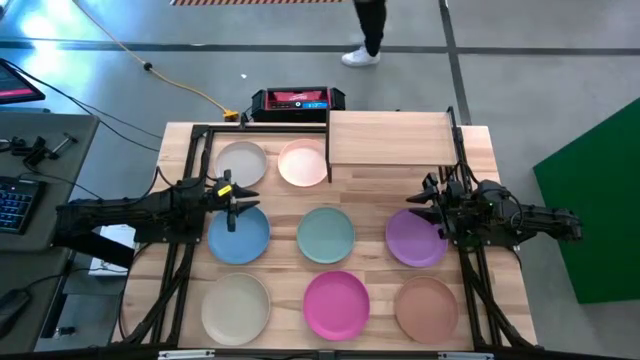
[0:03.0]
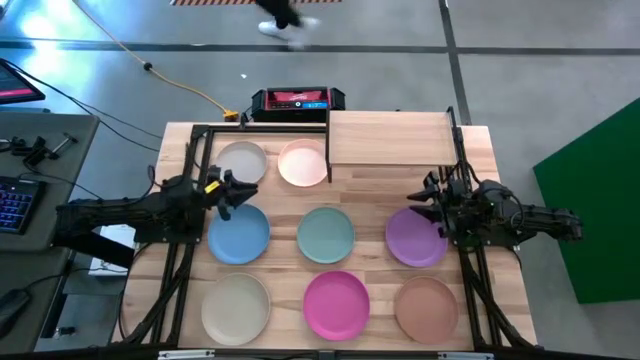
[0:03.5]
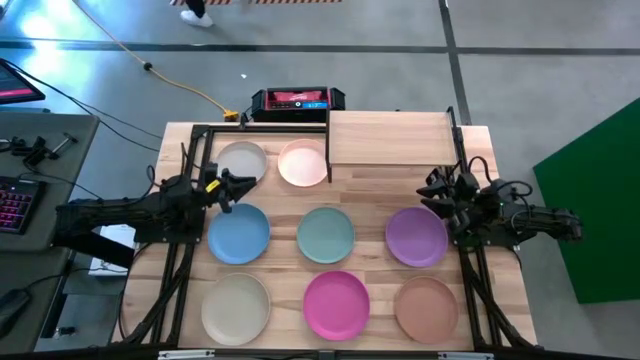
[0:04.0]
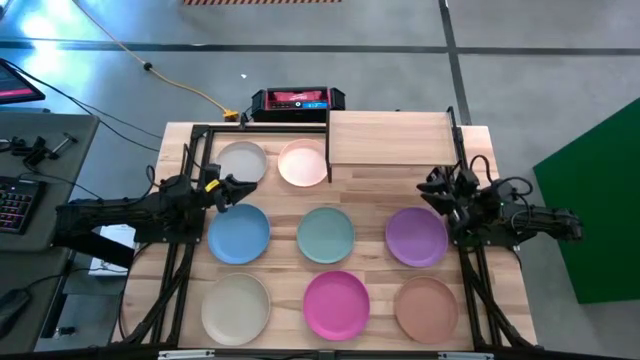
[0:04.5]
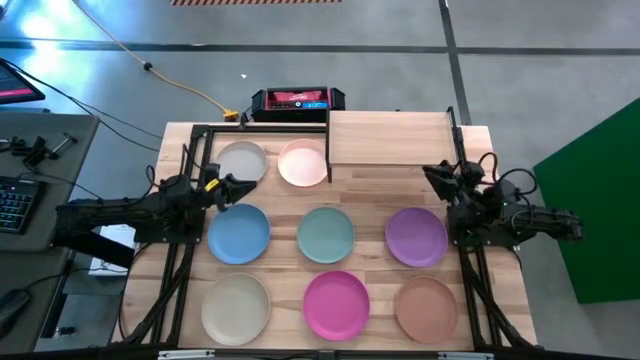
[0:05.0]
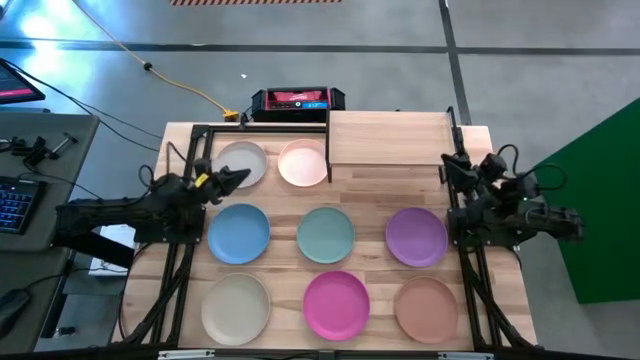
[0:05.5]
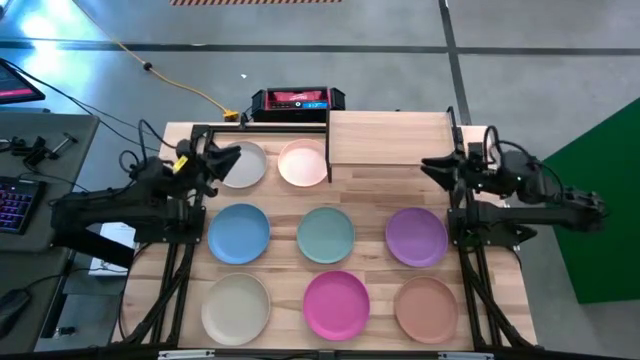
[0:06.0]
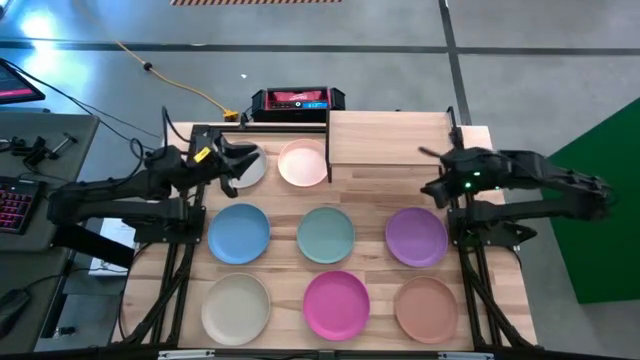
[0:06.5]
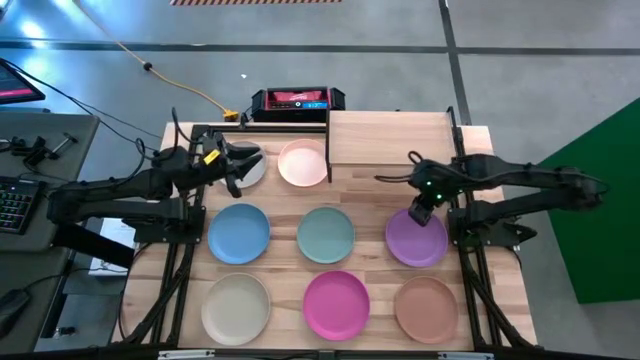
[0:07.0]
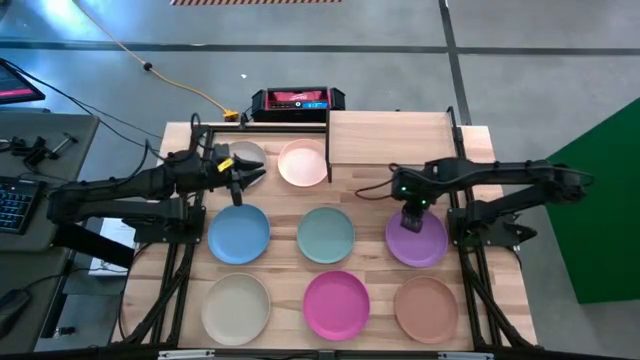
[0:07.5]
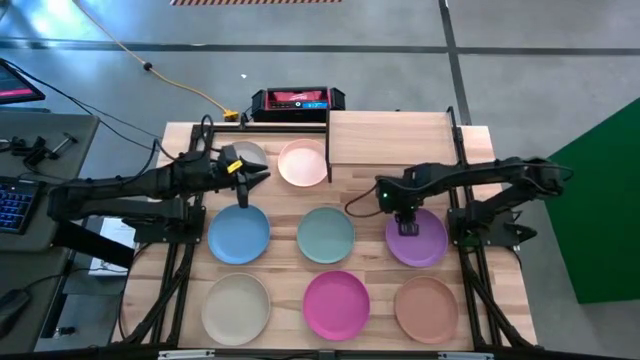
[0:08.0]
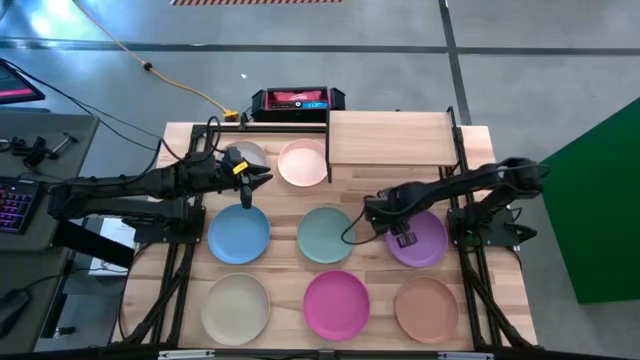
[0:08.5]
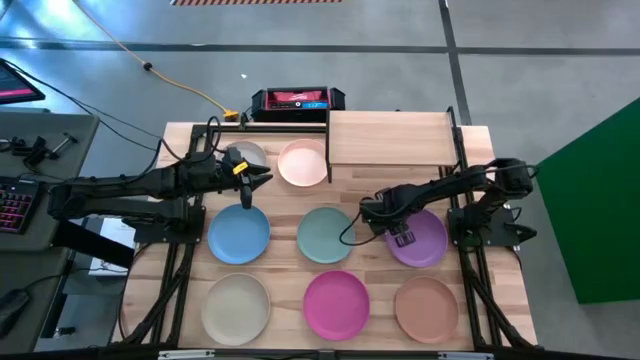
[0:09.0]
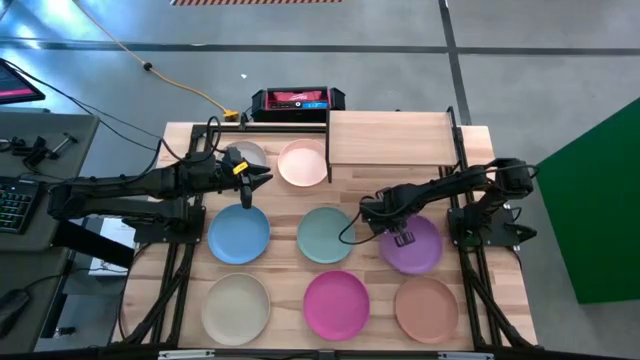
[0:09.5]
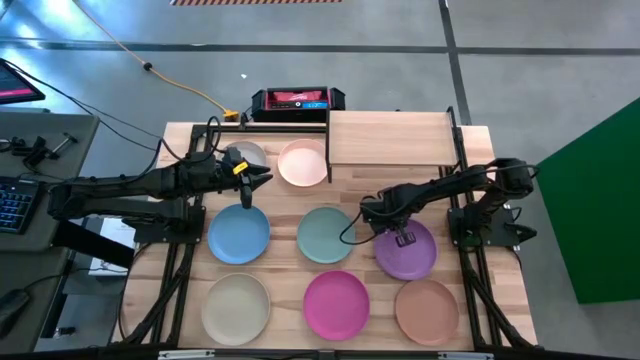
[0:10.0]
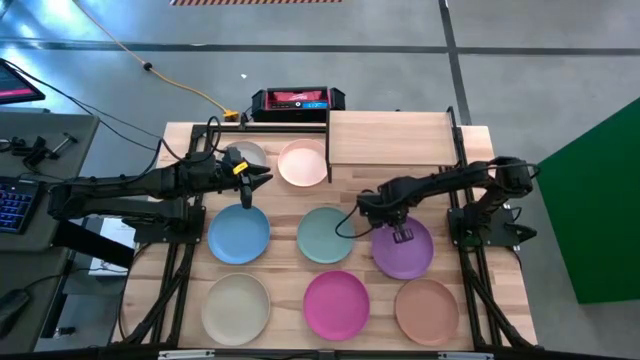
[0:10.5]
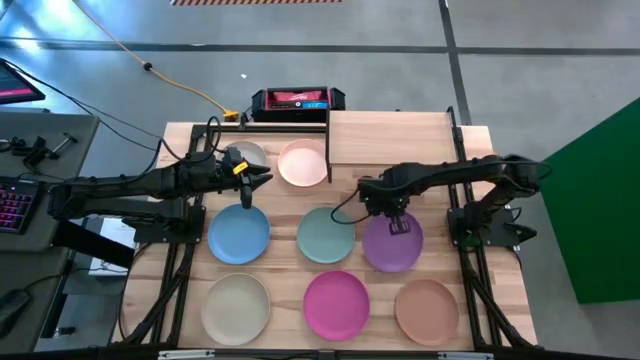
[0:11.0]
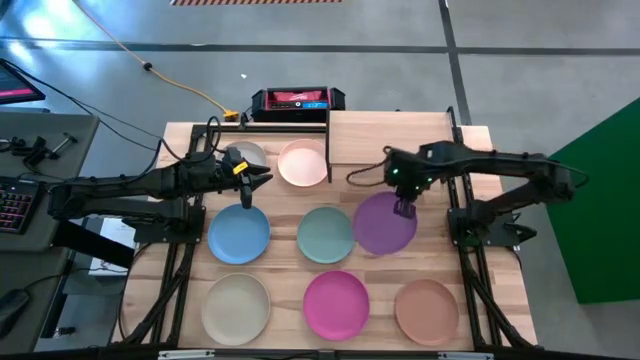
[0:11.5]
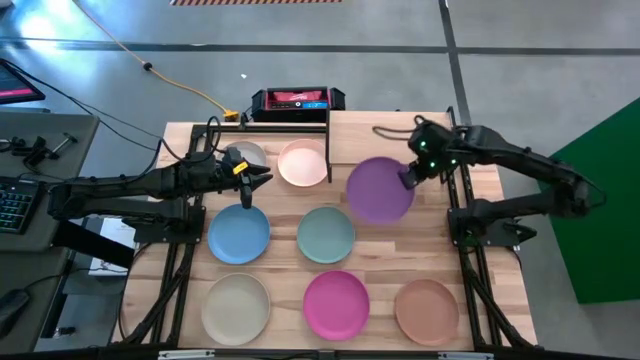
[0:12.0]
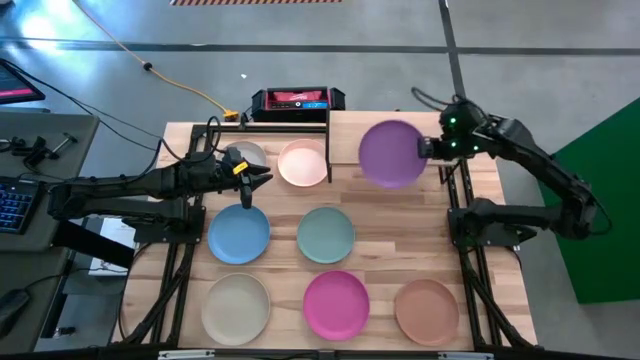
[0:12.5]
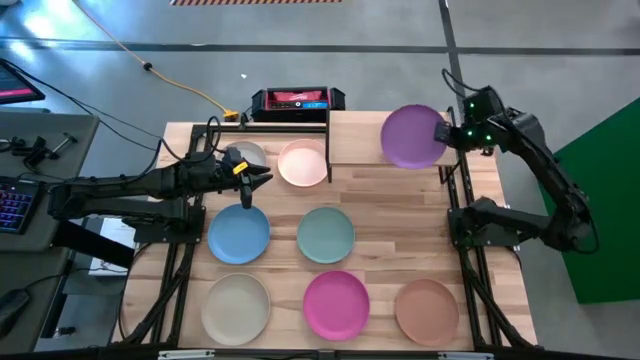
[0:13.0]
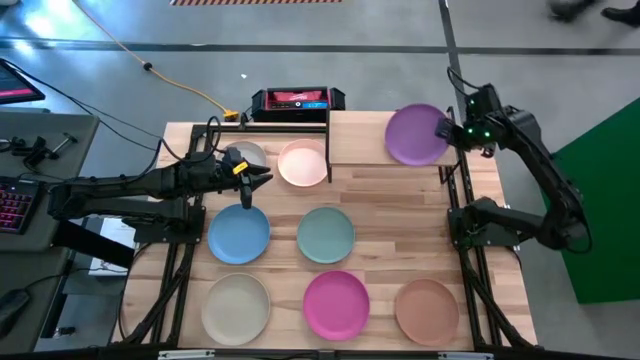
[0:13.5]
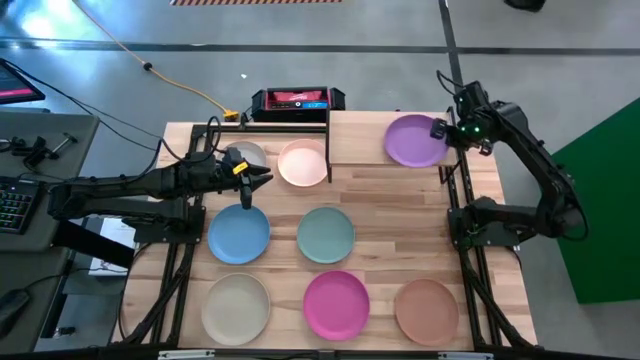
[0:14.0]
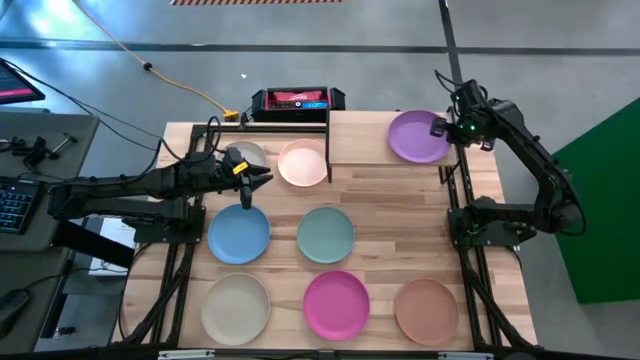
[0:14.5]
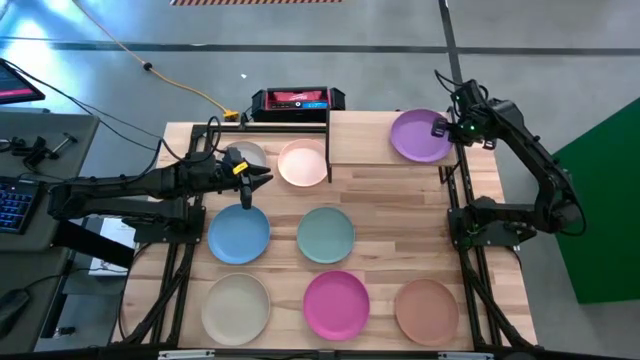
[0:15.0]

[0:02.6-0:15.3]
Task: Place and stack plates onto a shelf
Put the purple plate on the shelf

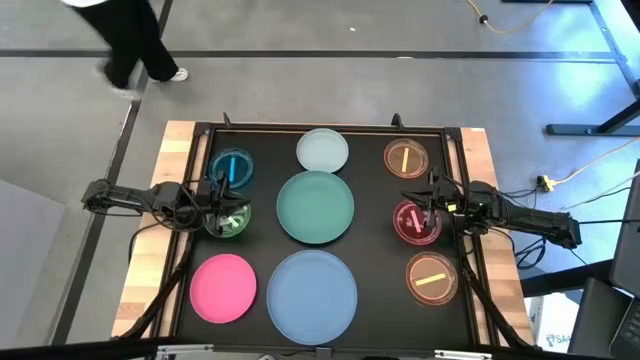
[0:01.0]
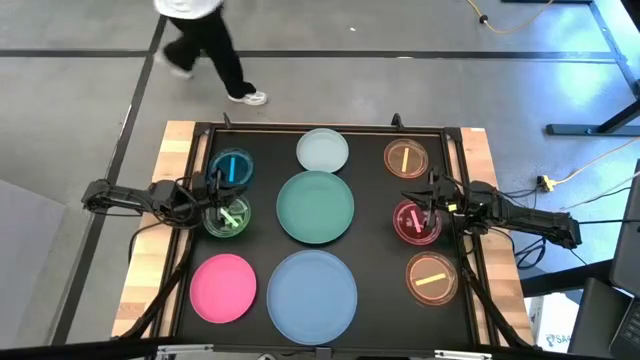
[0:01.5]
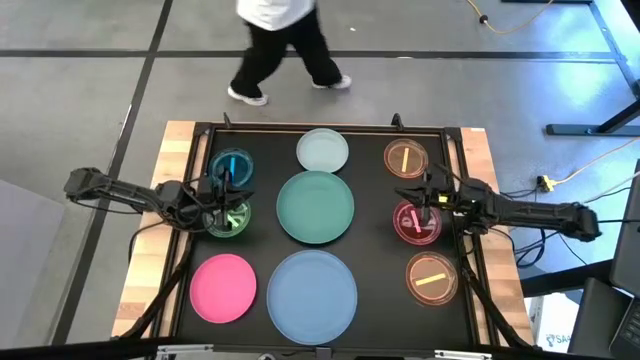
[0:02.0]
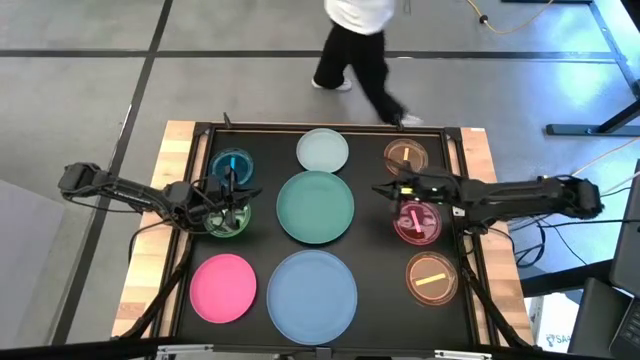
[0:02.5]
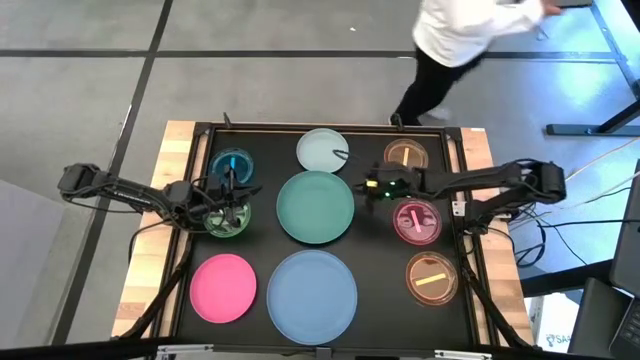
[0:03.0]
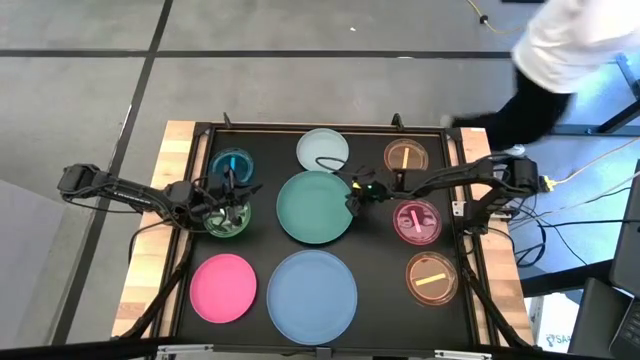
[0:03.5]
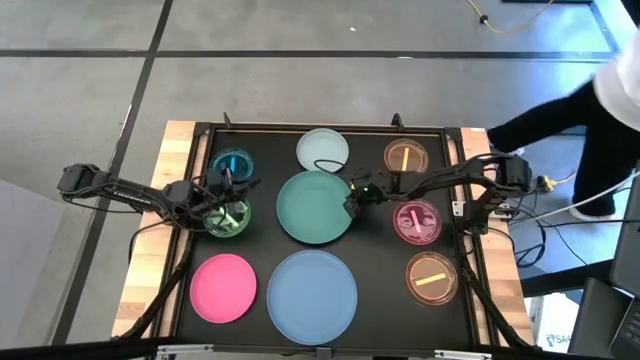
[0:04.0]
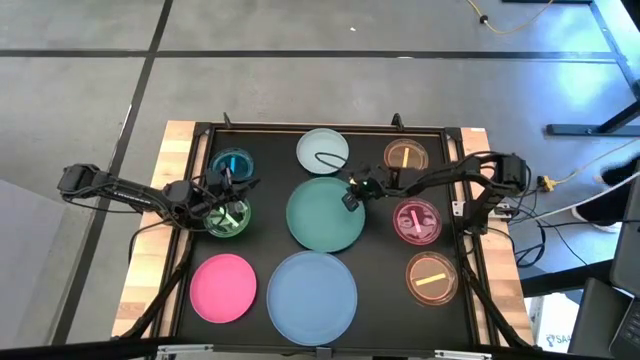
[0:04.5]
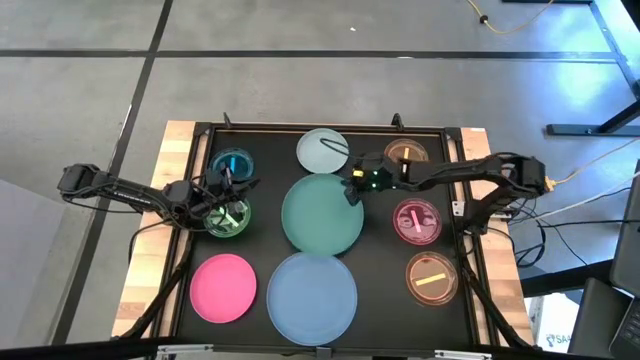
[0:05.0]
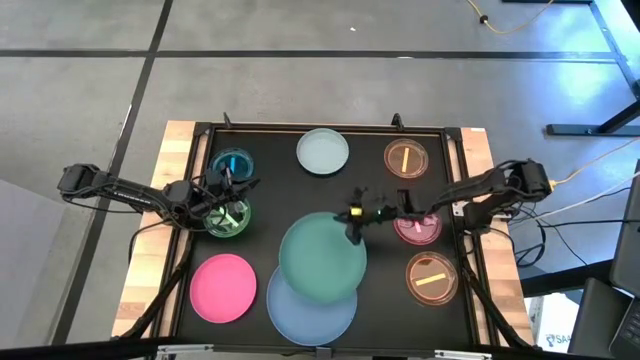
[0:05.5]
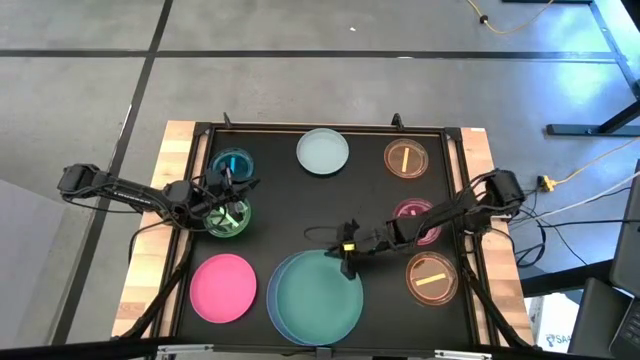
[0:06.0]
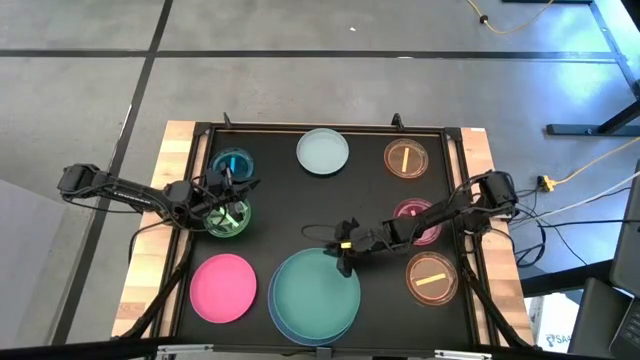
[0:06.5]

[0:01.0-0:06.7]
Task: Stack plastic plates
Stack the green plate on the blue plate

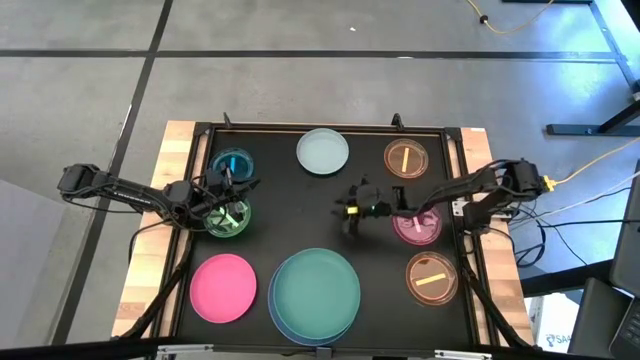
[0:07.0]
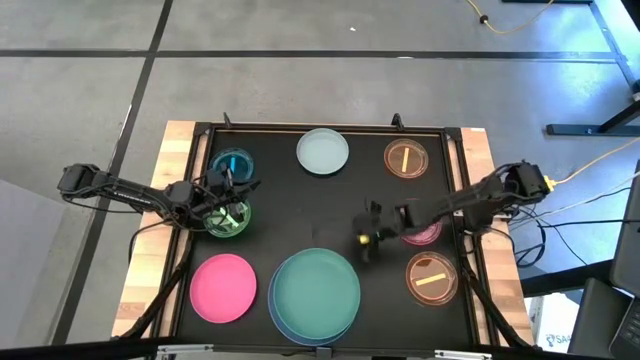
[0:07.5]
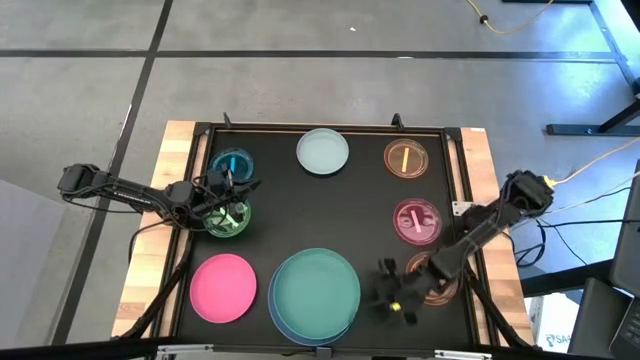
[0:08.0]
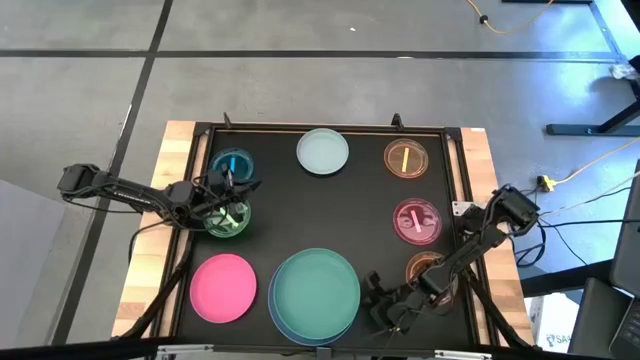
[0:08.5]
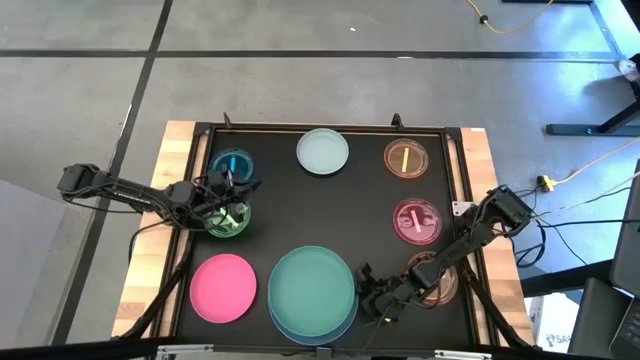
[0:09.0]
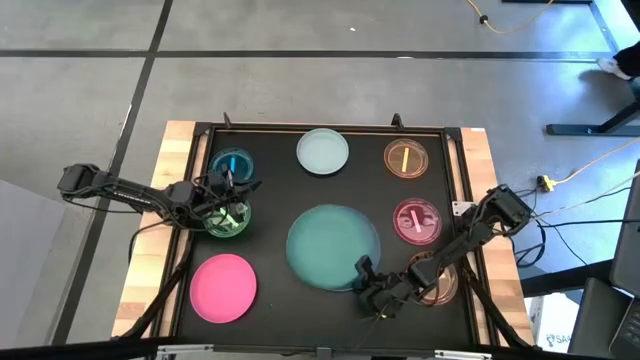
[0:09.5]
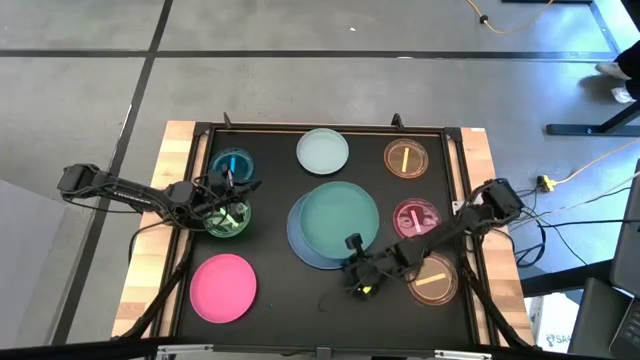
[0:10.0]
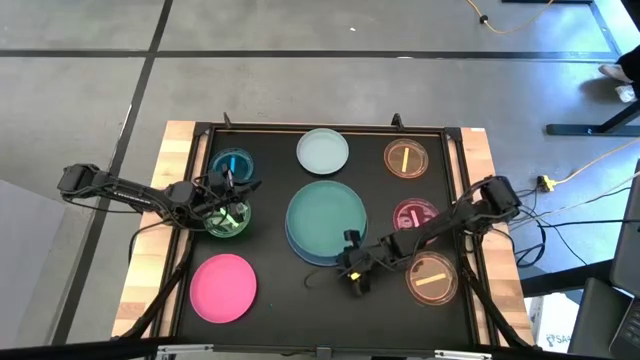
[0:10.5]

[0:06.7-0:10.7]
Move the stacked plates to the center of the table
